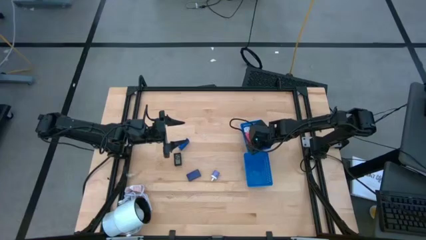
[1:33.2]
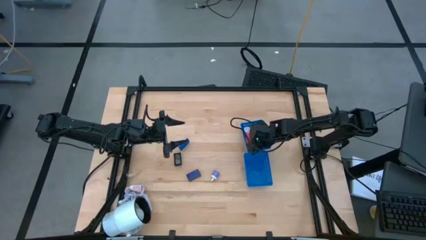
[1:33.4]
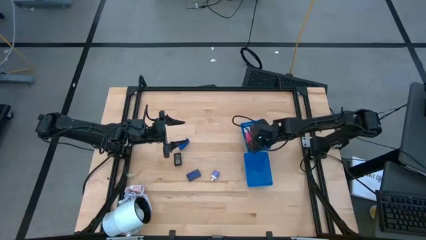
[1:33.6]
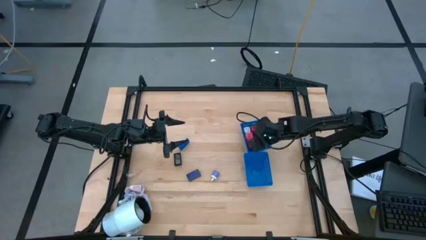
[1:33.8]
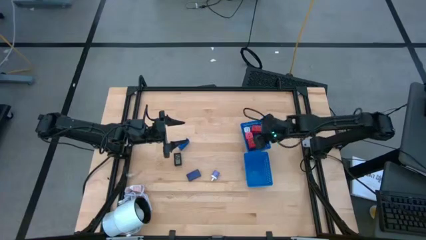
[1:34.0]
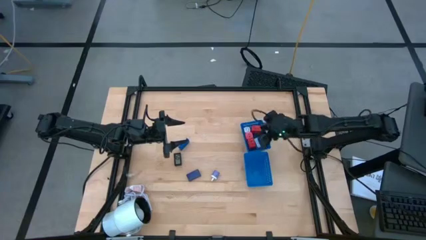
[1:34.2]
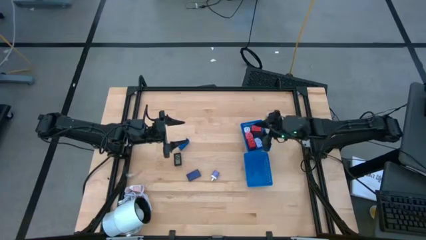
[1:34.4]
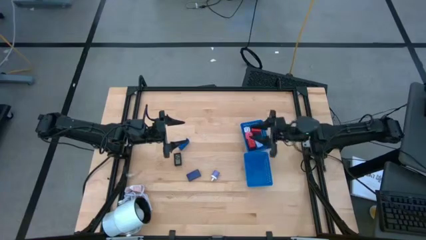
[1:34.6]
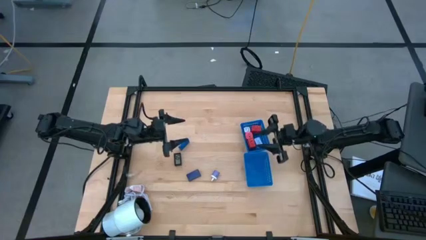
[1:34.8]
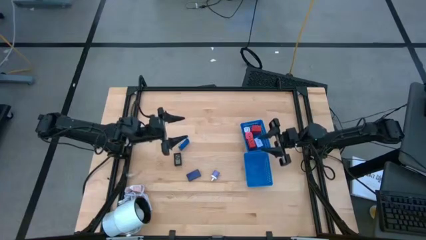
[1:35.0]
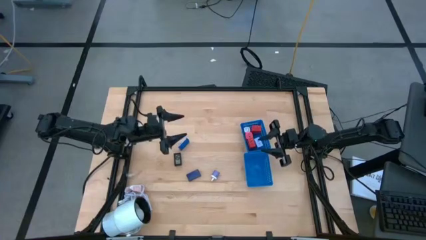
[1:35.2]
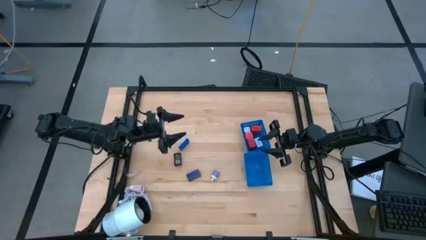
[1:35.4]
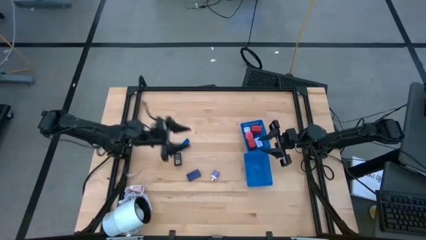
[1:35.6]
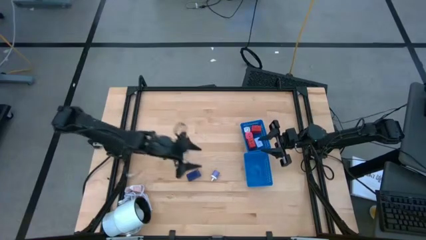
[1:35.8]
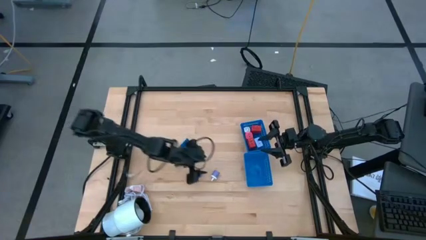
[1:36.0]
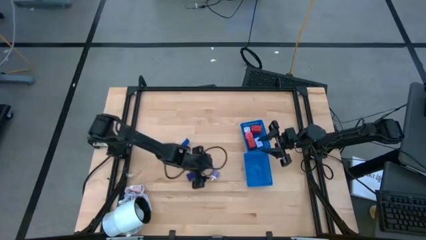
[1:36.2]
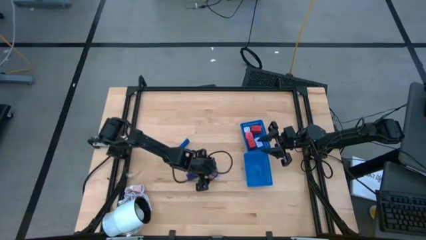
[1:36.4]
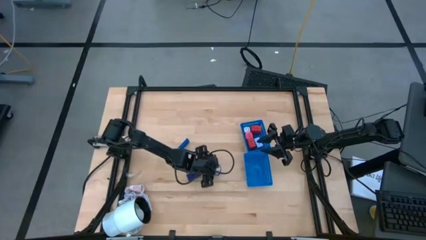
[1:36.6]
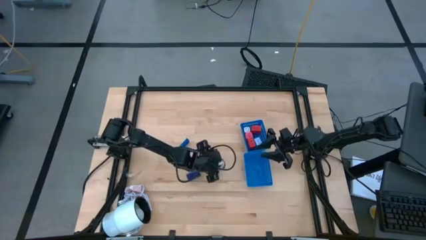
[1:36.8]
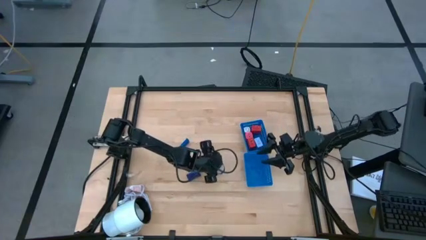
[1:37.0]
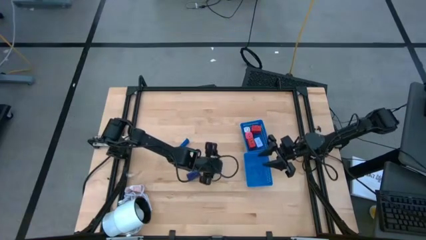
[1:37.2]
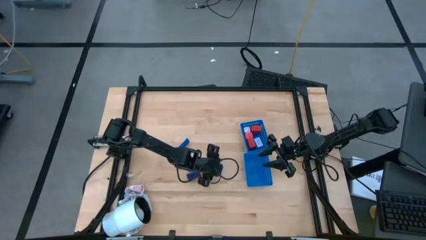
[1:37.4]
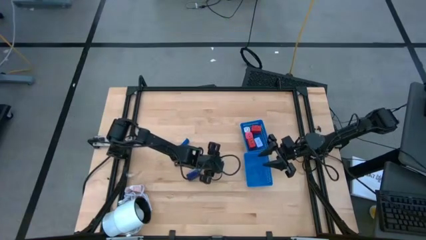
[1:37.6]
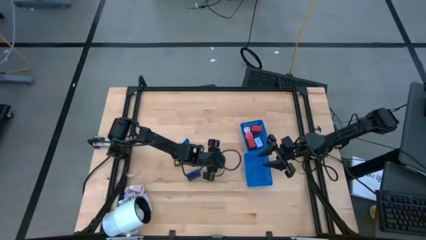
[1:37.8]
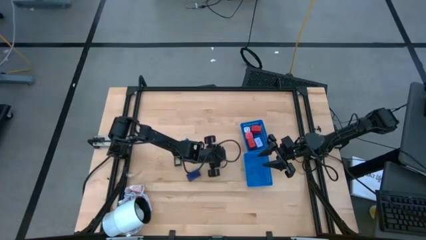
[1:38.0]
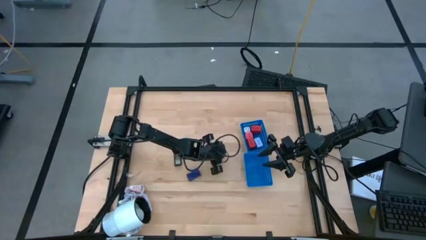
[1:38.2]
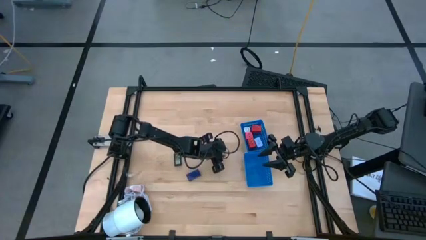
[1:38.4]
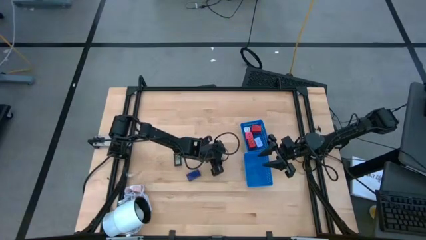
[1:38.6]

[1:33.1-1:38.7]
Task: Pick & Place Office items
Put the violet charger adapter into the top blue bin

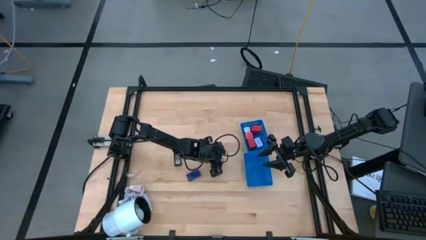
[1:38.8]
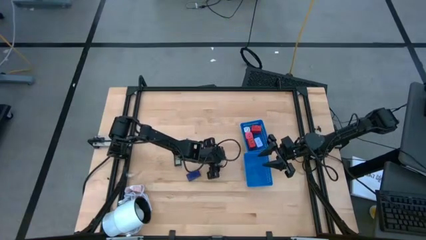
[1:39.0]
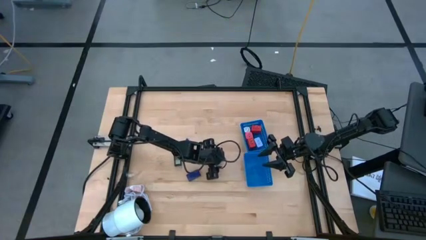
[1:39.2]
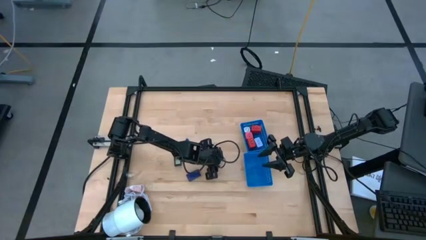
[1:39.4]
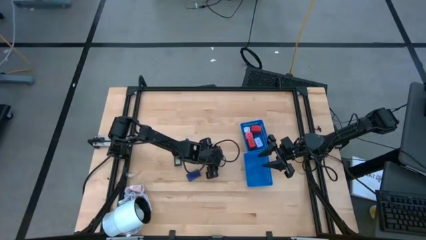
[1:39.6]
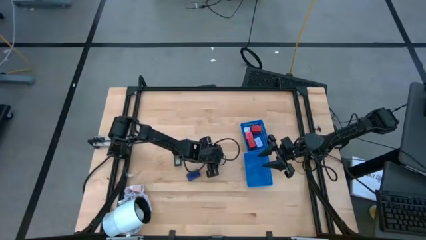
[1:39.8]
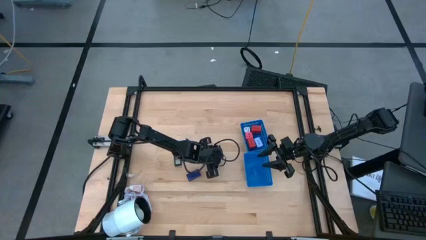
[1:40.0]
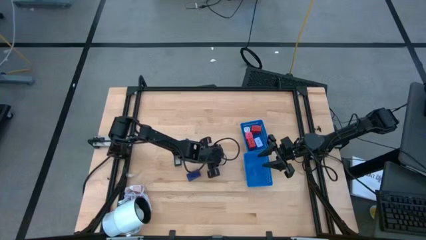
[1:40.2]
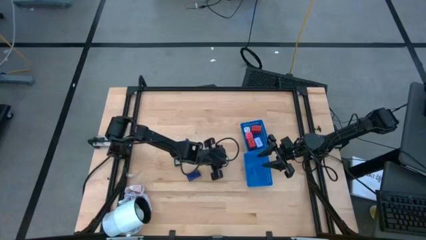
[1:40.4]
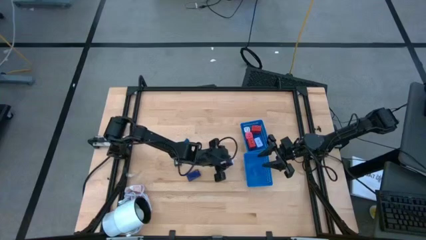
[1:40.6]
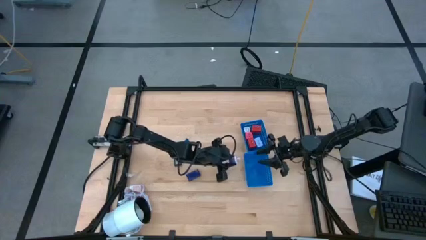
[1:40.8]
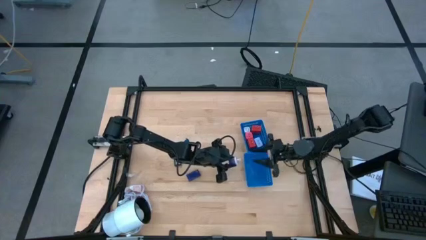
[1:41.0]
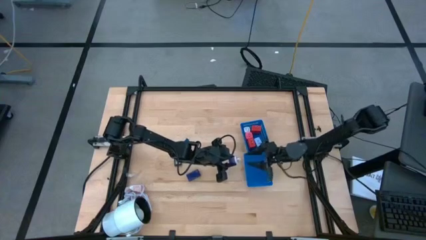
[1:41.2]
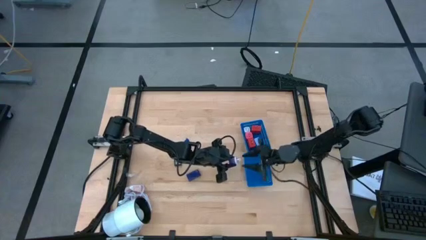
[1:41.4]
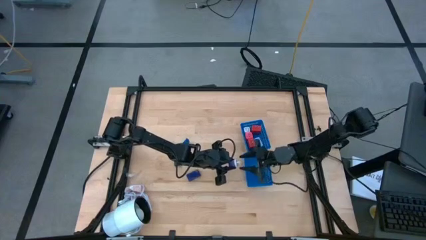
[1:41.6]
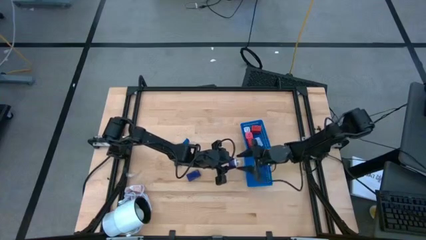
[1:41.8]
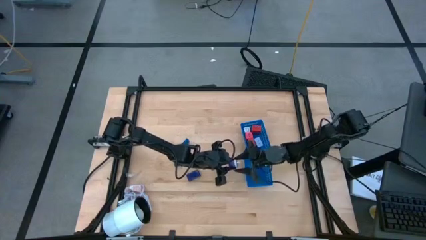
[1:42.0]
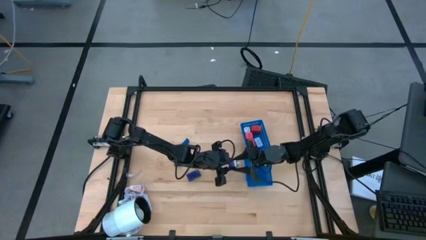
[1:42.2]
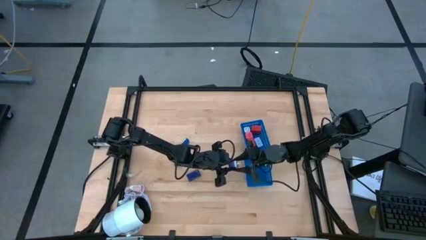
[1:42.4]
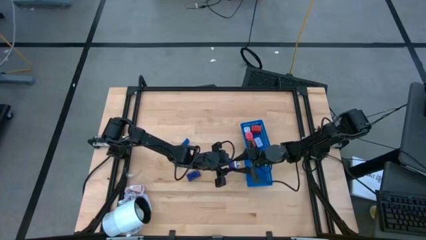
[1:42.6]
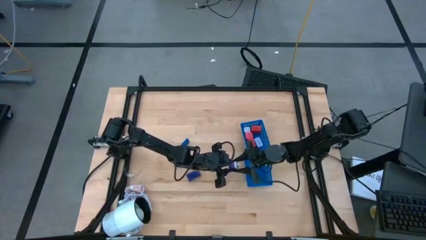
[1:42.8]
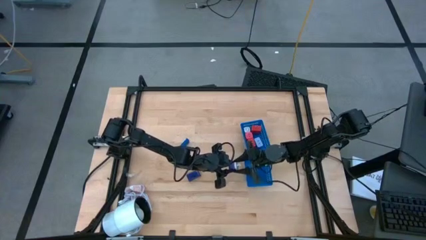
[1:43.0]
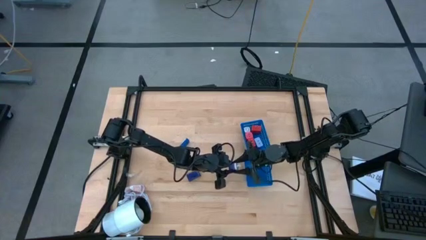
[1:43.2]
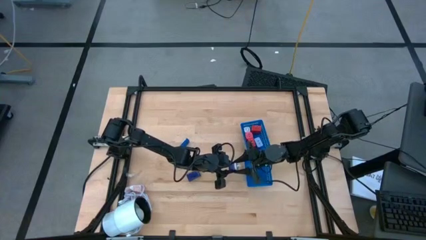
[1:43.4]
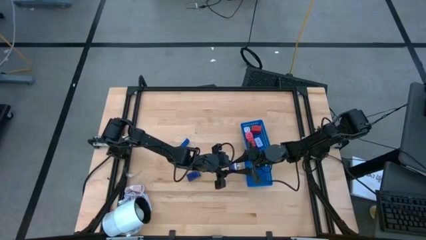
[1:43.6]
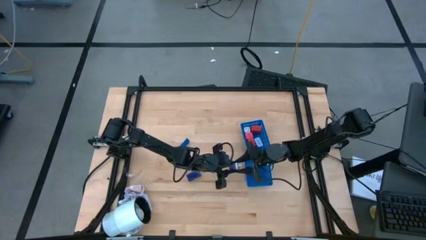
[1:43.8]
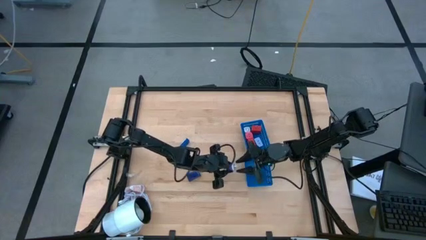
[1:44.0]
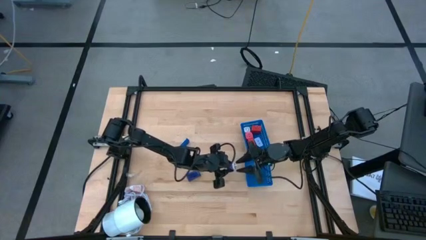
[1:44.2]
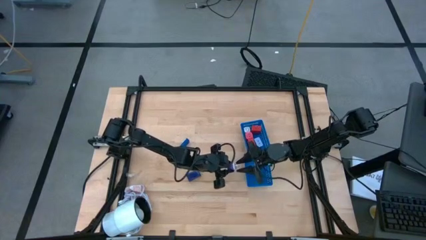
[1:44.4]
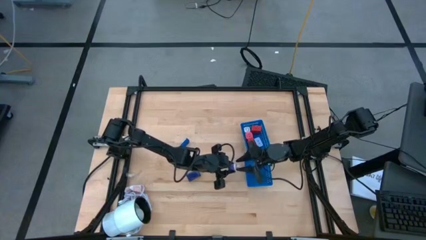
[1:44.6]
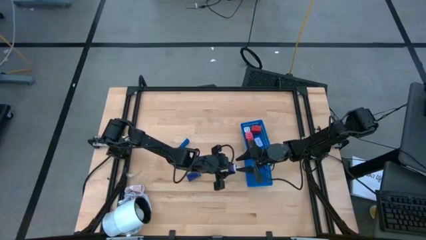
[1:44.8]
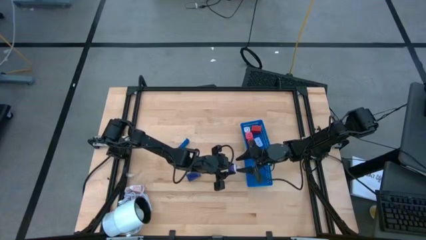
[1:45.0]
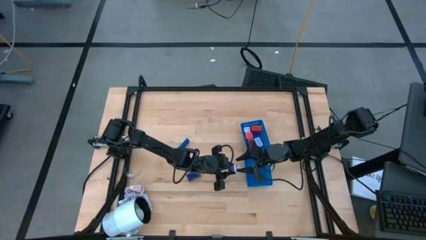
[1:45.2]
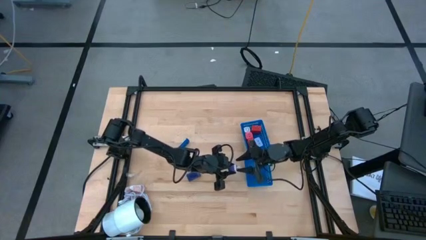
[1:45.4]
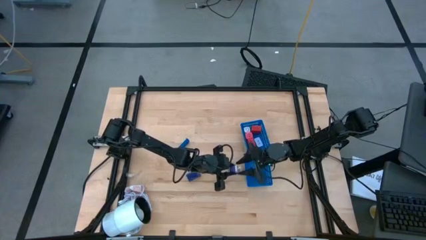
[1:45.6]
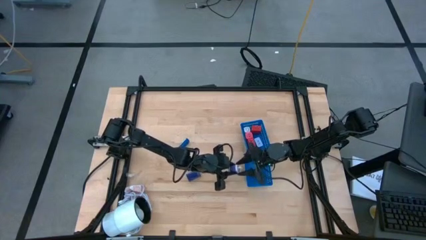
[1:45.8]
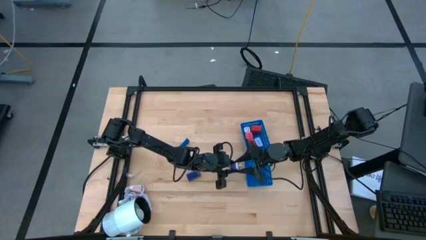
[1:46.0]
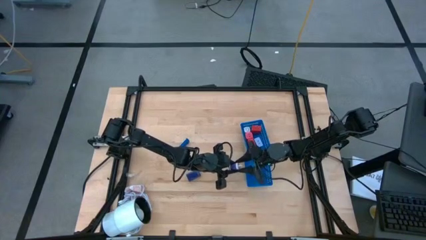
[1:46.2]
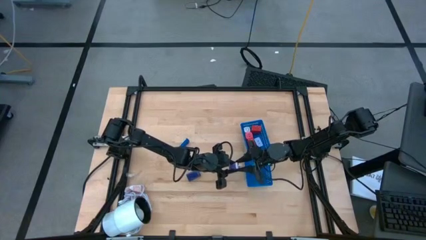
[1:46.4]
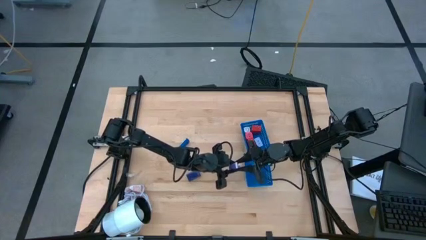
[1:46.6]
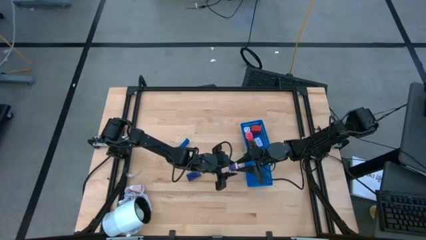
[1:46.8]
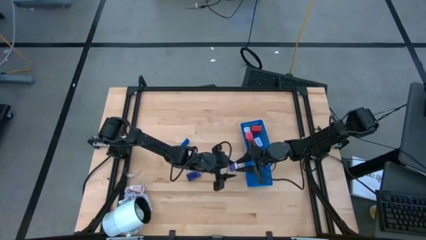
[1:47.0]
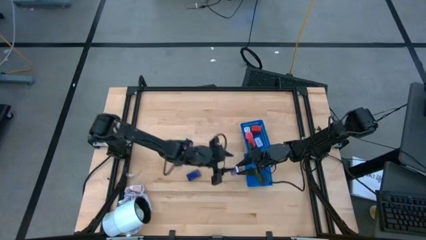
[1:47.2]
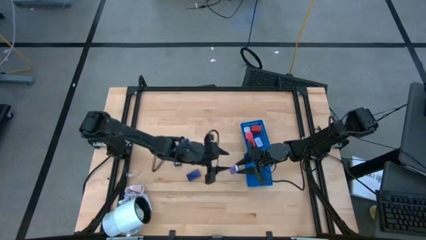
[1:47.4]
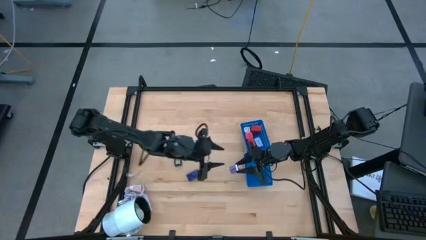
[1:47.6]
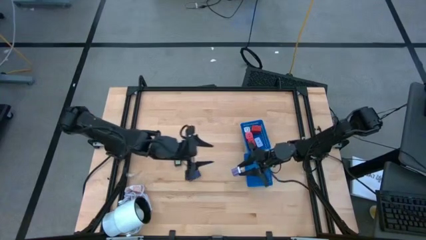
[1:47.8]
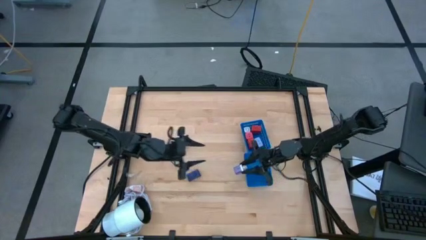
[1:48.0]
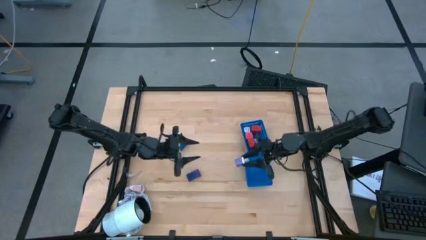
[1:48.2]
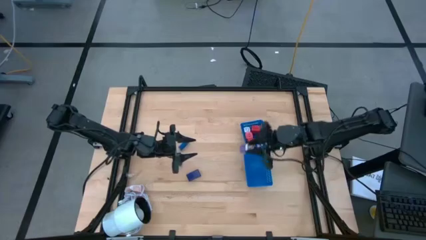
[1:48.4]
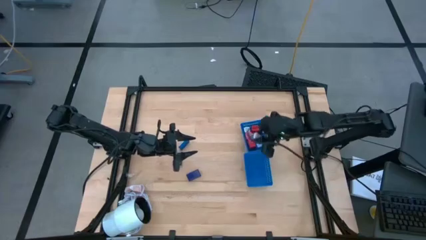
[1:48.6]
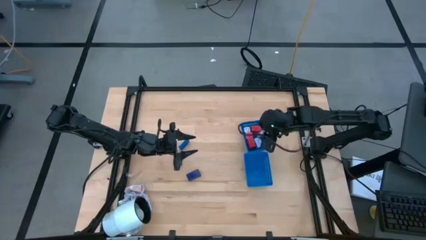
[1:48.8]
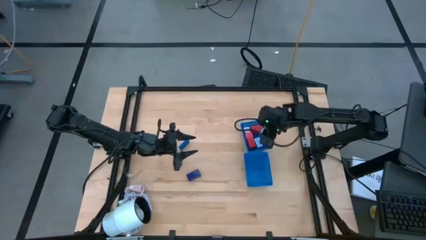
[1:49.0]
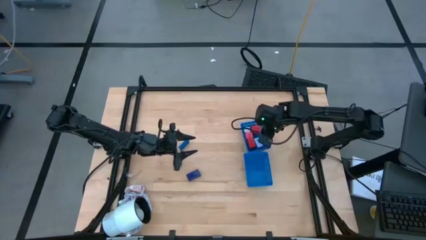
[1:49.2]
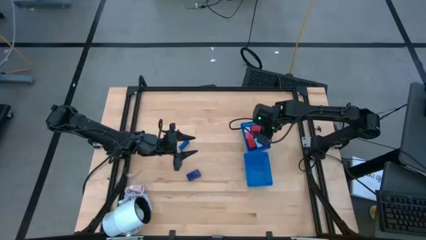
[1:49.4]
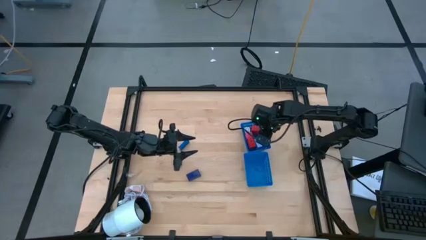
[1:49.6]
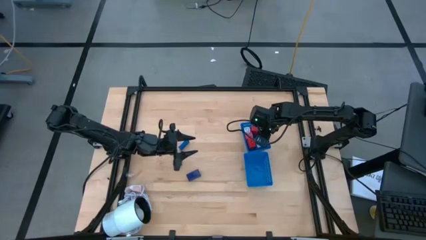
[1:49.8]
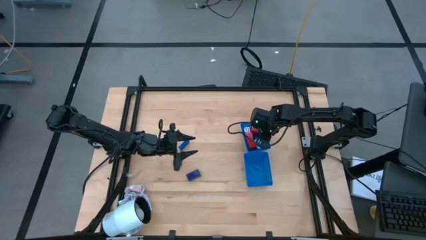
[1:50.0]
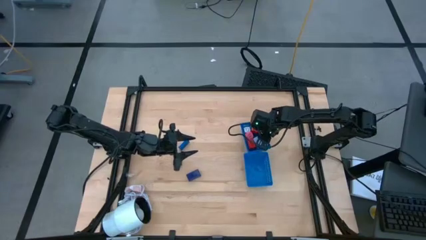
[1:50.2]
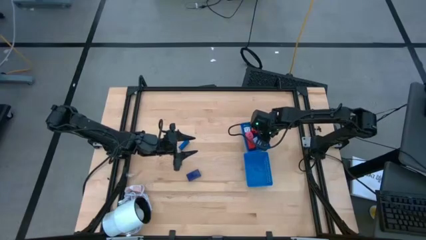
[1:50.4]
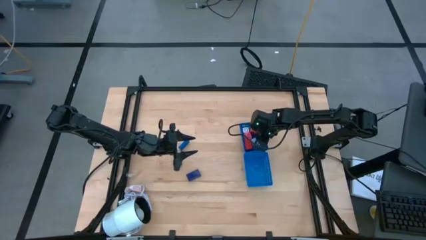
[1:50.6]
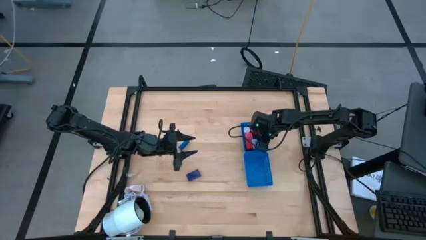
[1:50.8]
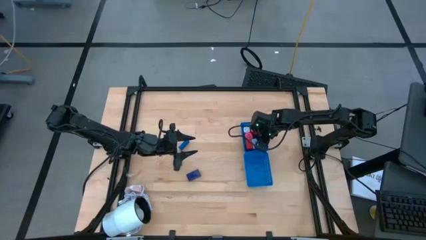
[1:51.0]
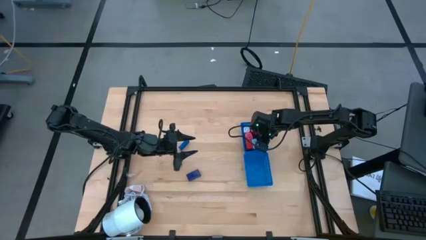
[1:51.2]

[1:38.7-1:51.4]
Put the violet charger adapter into the top blue bin
